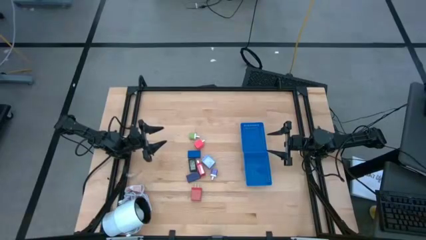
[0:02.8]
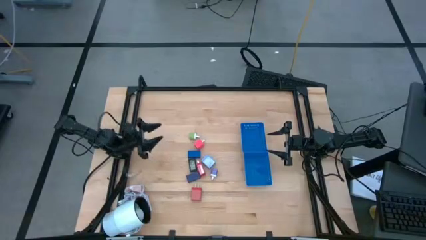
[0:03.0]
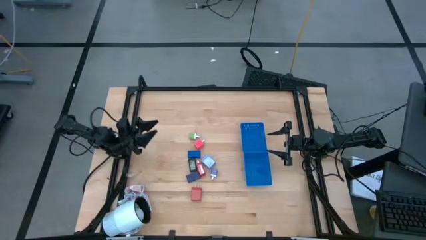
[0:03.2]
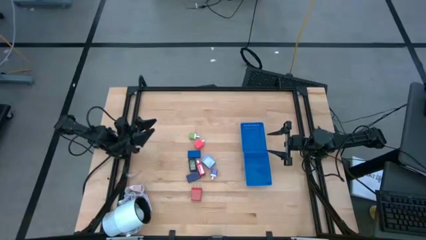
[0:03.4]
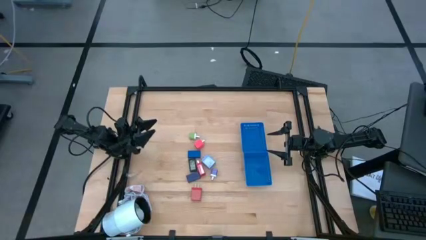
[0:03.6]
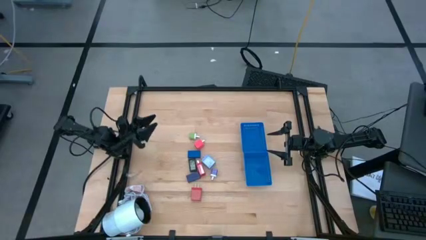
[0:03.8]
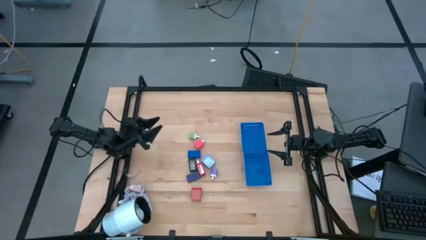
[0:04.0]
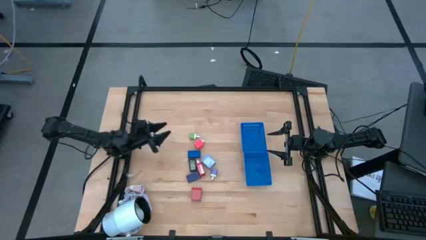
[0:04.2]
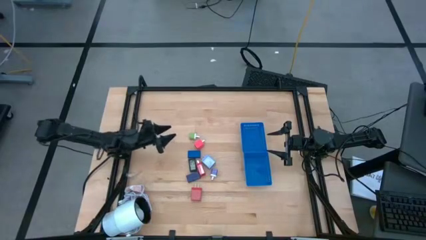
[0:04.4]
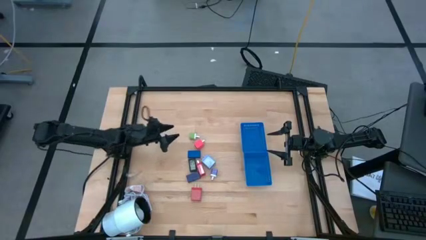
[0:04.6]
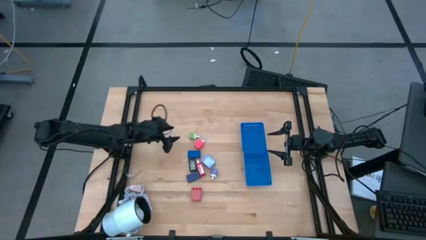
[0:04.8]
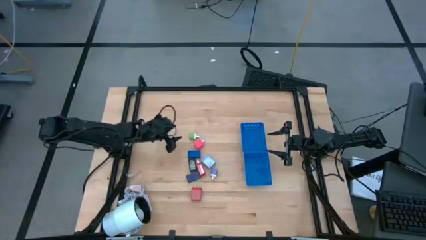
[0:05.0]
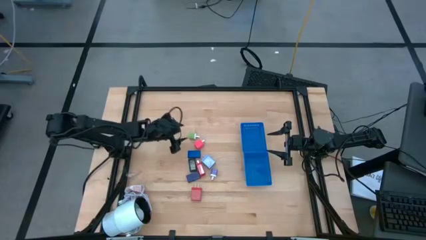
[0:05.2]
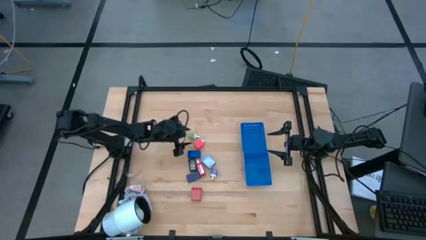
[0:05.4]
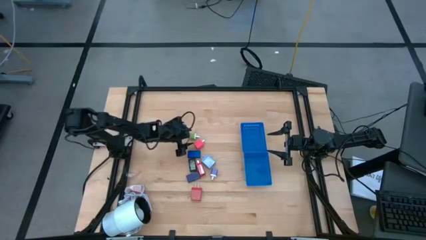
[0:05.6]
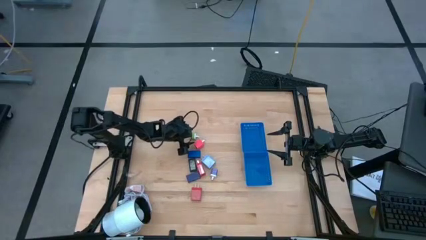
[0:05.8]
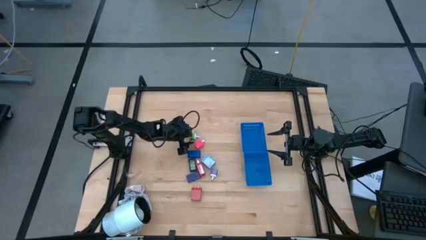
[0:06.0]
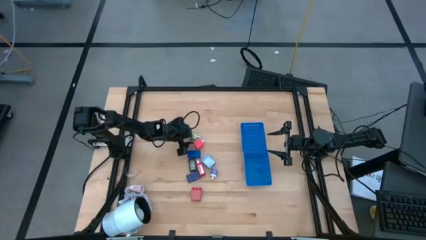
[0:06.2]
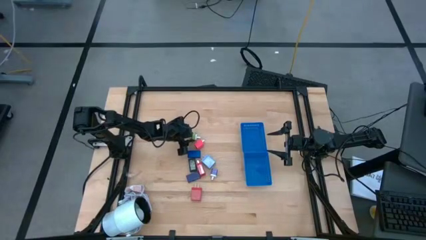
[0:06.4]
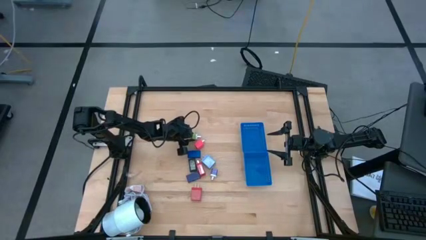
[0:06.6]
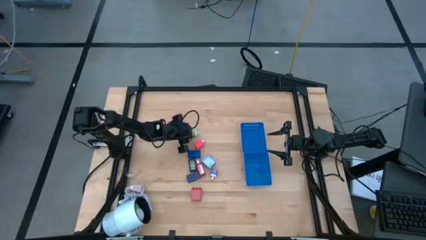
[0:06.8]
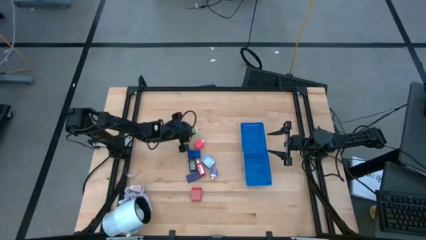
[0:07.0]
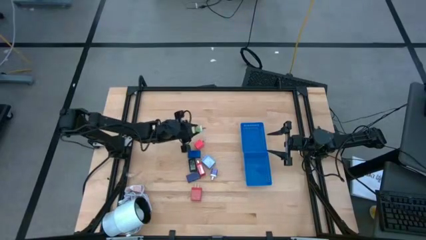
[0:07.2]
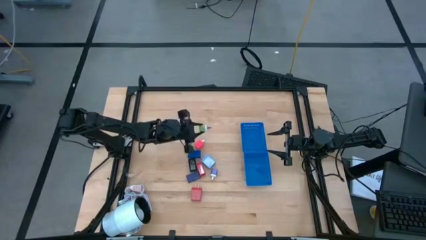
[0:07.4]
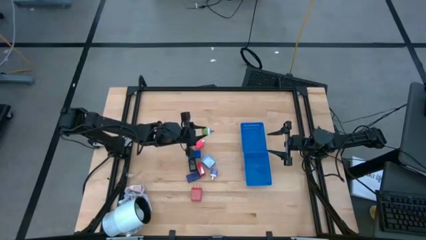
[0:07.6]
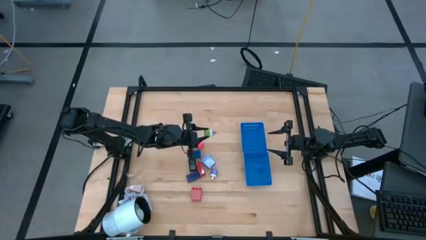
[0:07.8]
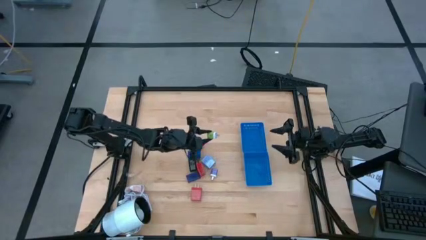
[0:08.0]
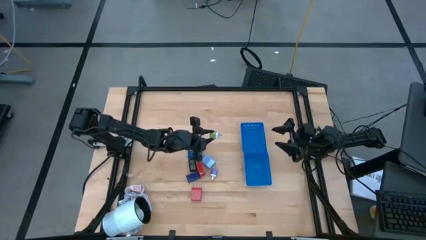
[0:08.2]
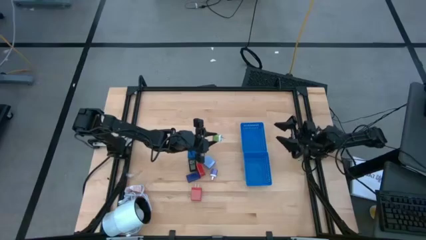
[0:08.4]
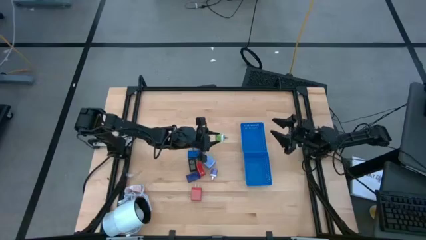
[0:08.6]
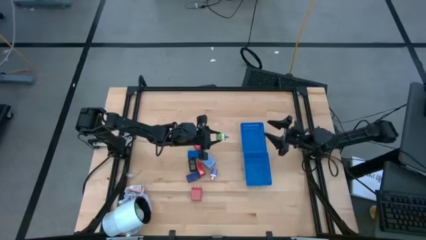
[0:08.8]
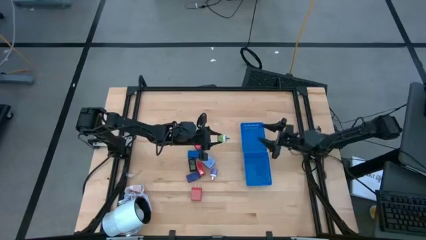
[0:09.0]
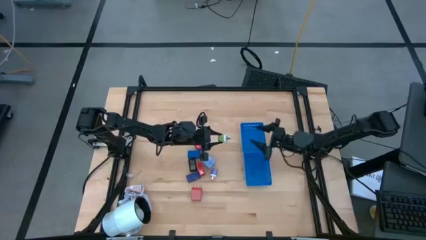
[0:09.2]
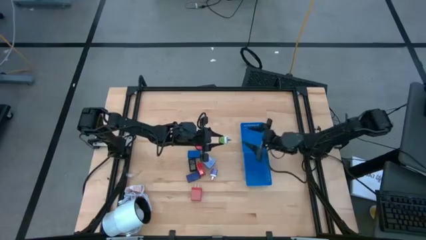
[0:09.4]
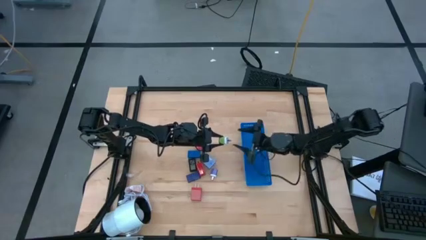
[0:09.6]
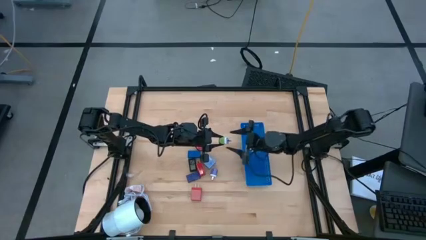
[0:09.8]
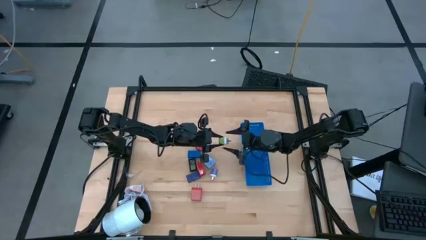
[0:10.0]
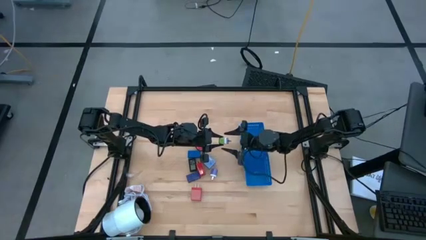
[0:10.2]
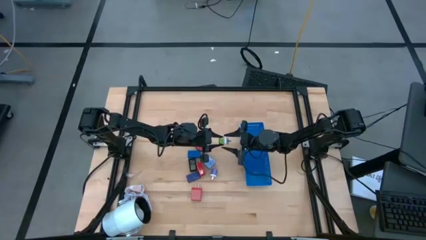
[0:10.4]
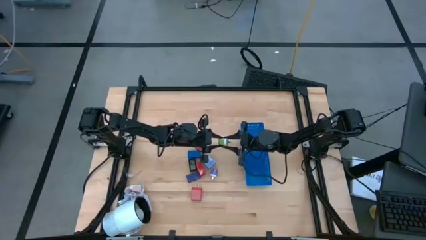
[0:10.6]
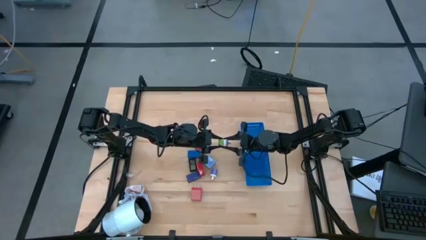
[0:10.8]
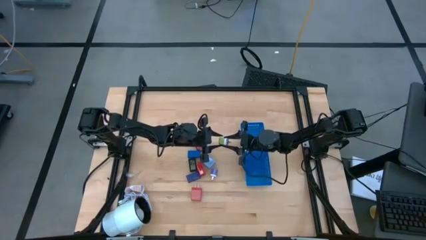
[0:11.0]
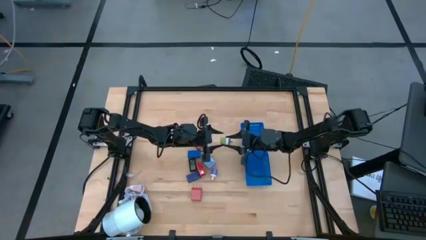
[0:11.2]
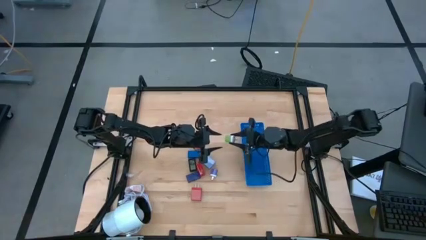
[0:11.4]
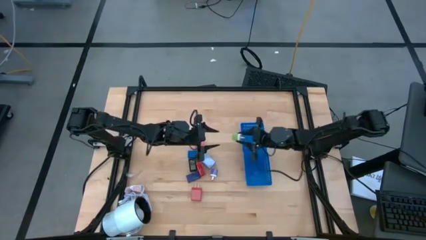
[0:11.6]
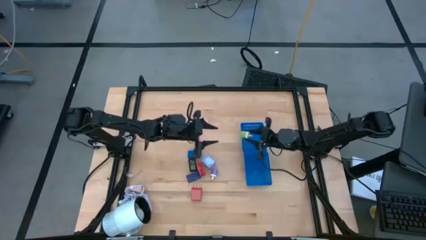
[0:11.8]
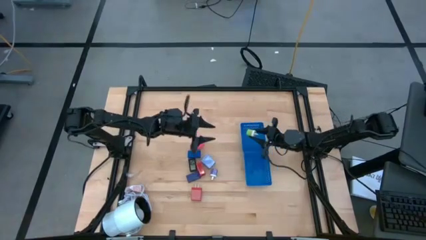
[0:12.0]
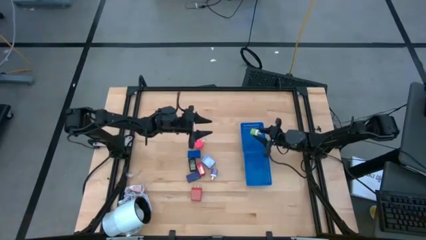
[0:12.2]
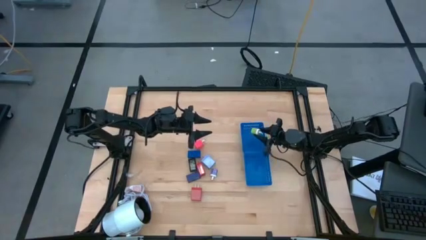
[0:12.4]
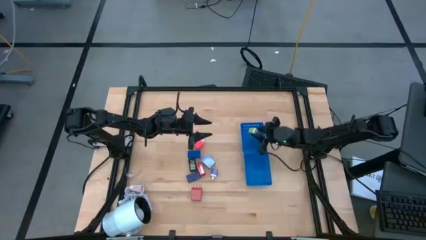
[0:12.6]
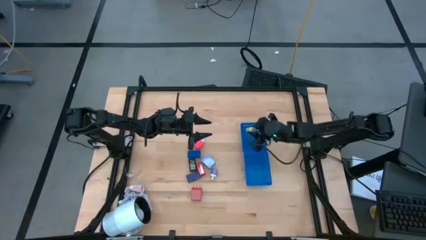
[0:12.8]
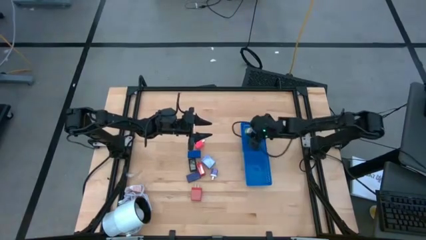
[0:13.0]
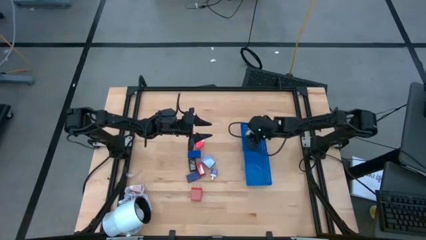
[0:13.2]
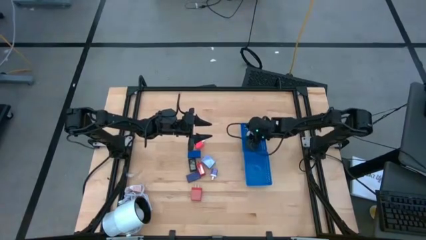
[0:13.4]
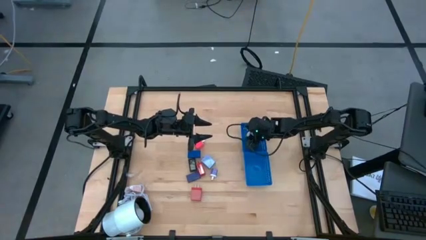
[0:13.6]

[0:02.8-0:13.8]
Task: Pick & Place Office items
Put the green charger adapter into the top blue bin
